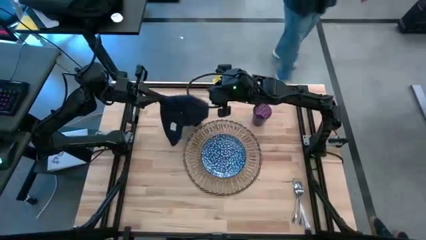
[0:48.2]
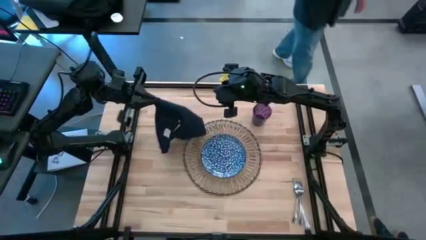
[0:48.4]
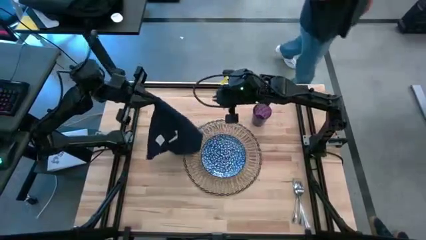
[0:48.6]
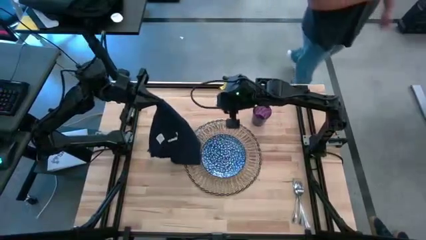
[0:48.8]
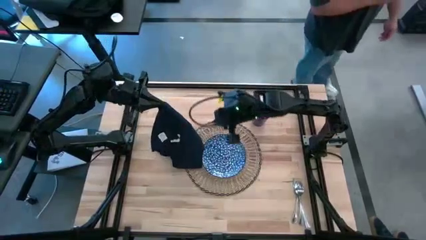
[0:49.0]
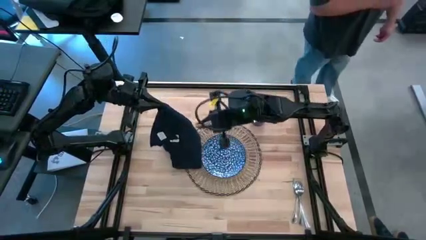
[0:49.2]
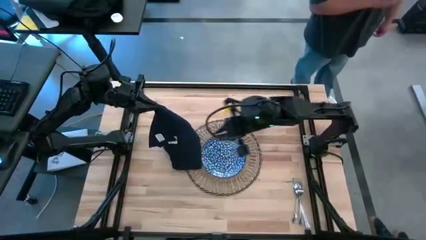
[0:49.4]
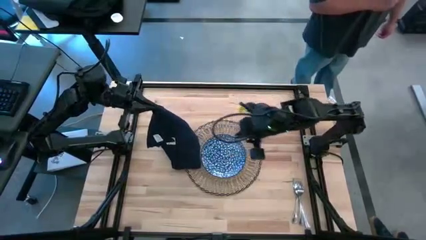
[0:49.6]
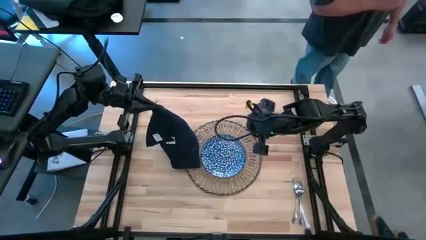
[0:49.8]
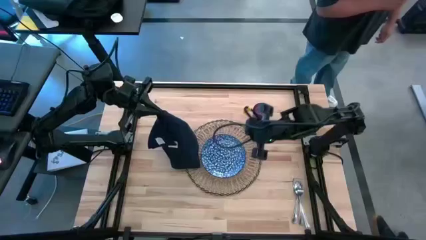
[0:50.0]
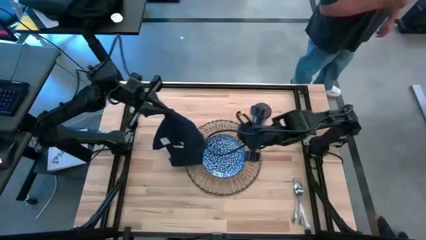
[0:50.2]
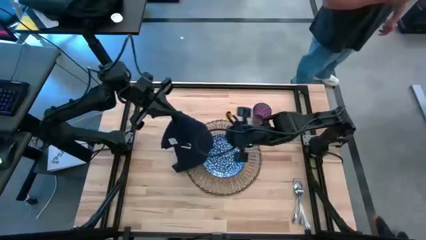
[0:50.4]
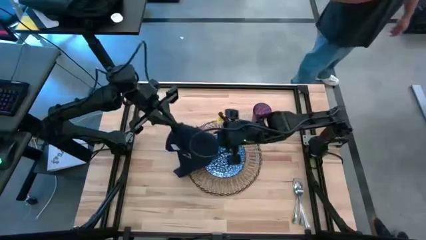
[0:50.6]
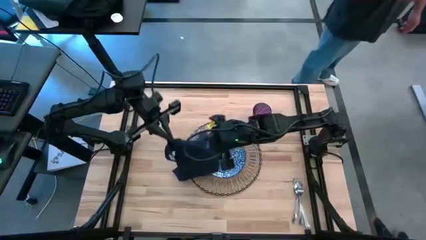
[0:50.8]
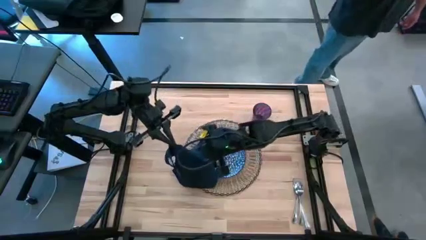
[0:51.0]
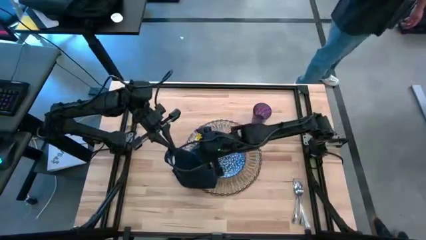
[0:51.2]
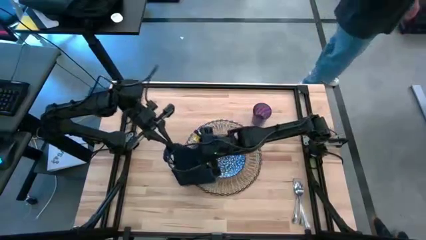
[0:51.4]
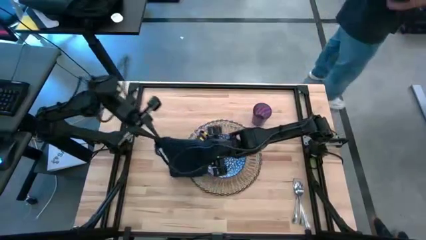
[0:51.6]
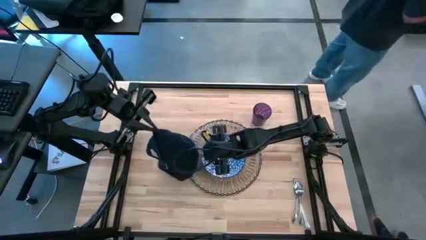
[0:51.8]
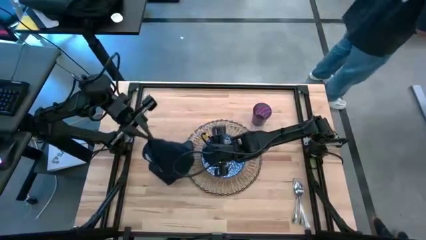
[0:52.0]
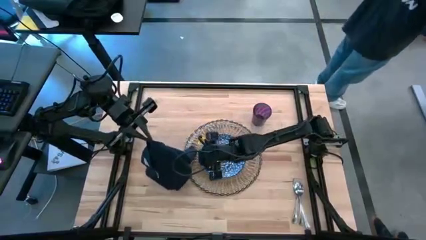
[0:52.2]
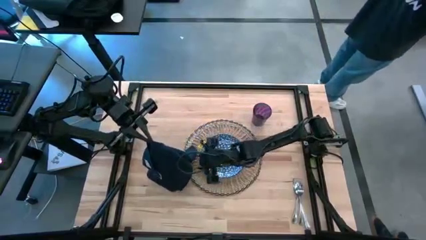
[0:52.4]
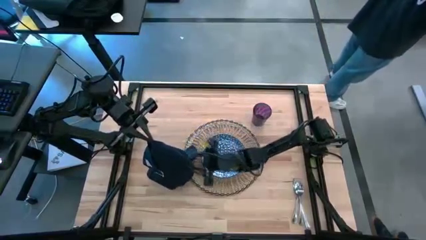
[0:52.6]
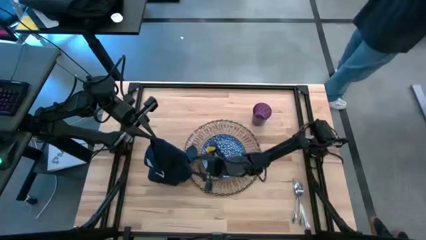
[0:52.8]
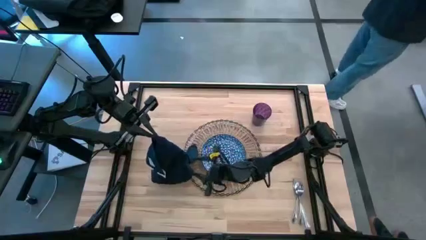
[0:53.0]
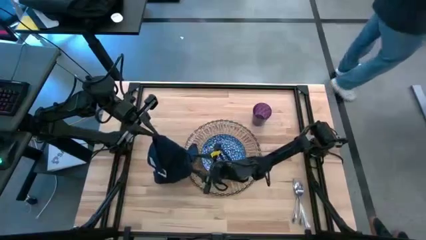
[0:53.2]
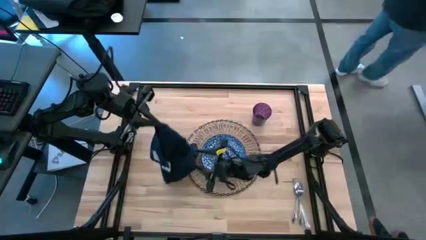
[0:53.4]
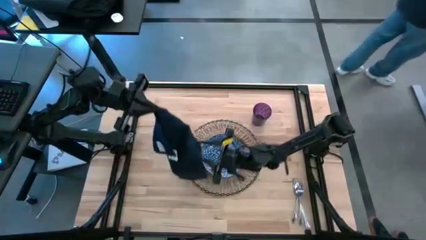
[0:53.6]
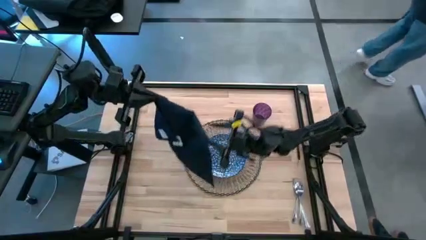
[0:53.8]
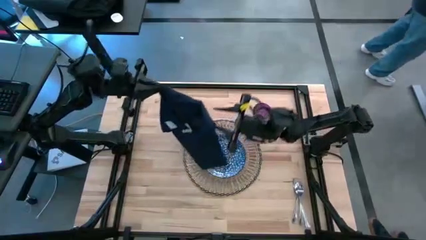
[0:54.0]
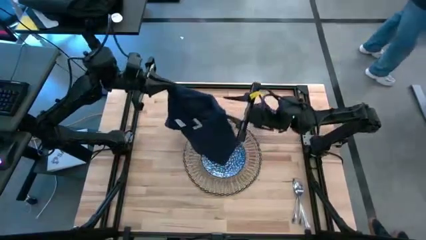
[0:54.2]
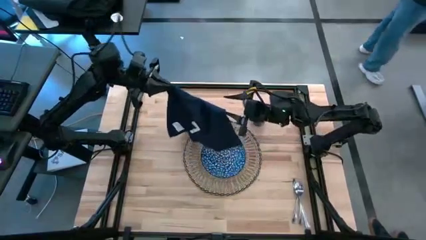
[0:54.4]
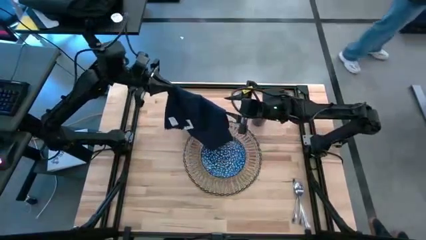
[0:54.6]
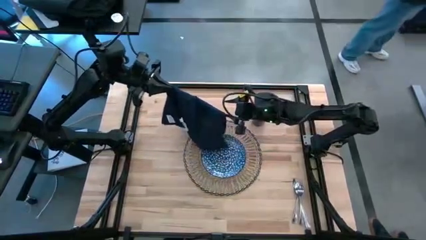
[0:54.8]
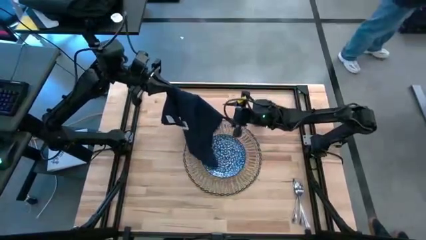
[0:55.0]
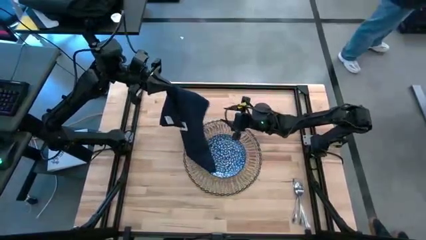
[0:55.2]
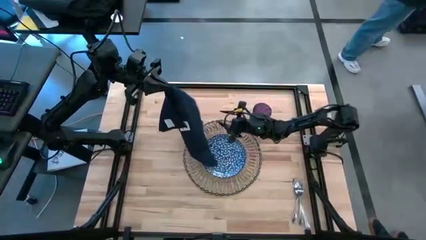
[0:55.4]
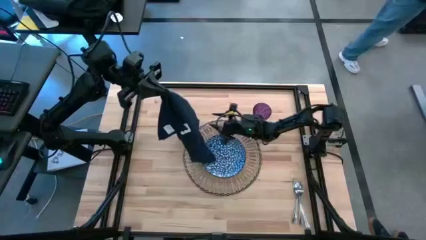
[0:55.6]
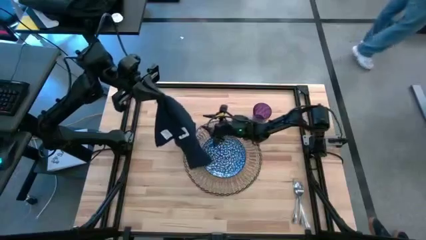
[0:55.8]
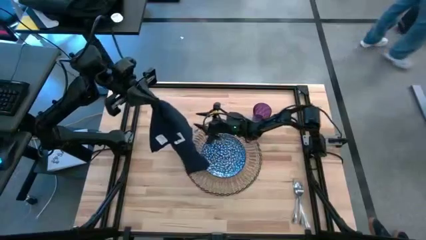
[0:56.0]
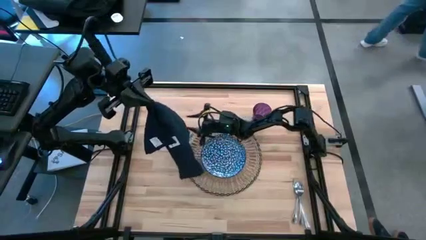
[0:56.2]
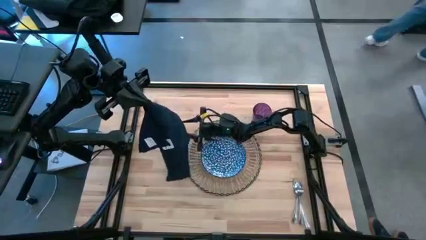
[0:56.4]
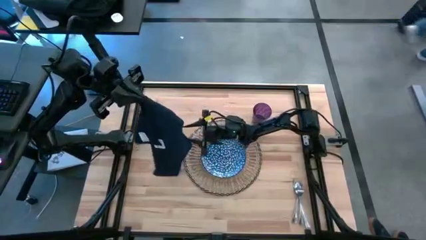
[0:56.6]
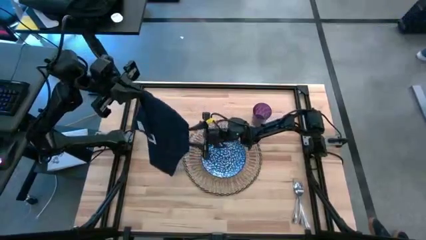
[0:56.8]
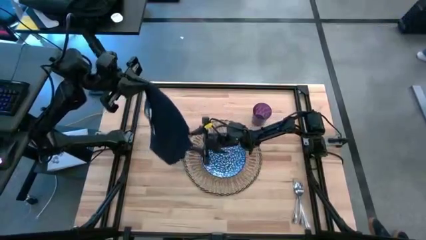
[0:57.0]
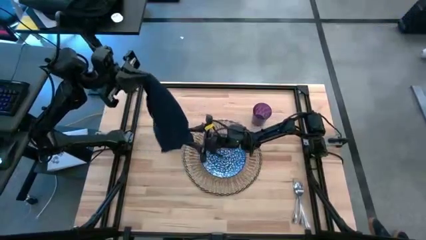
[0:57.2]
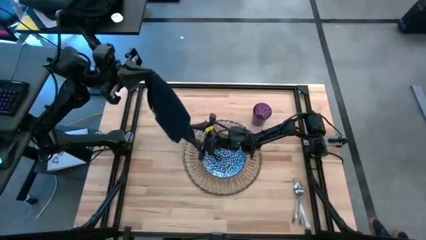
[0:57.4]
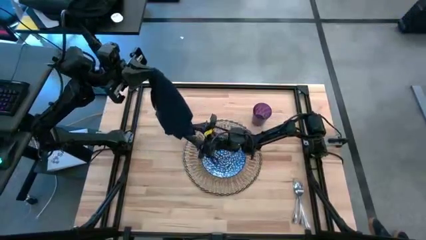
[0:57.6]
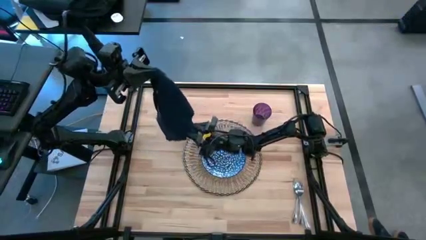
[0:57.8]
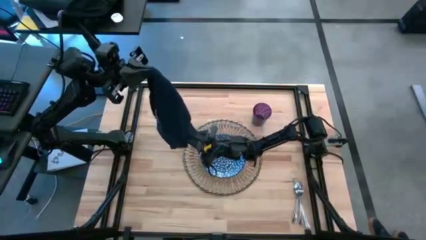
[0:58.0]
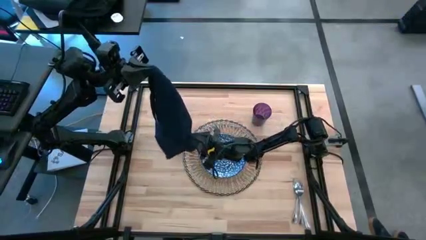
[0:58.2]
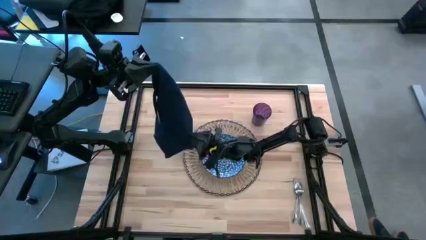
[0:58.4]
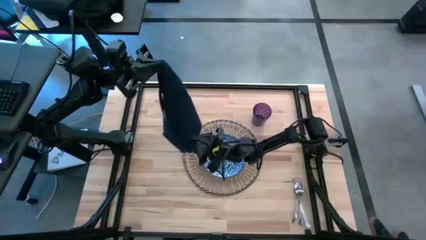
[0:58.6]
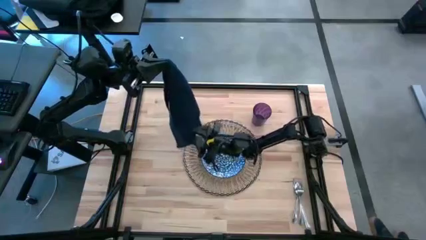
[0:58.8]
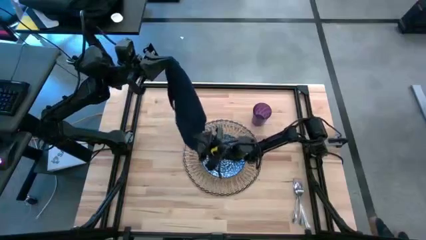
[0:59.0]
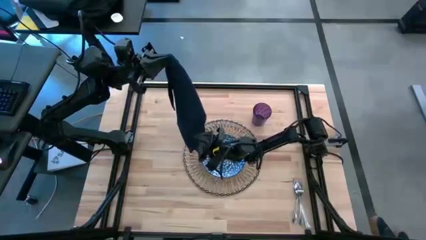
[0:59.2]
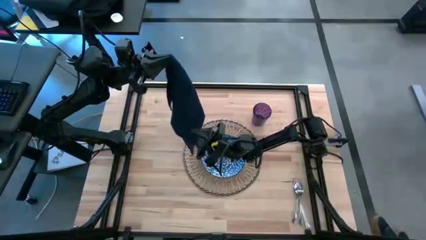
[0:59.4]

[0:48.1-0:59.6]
Task: Set table place
Fold the blue table napkin

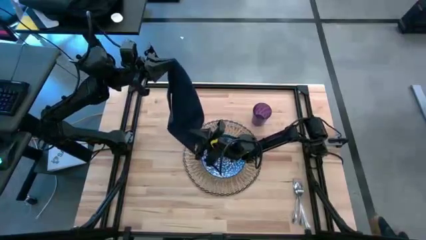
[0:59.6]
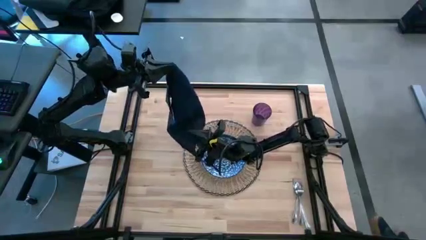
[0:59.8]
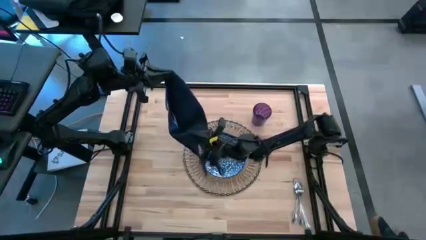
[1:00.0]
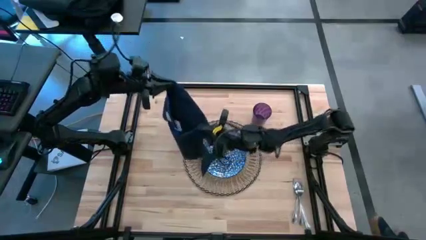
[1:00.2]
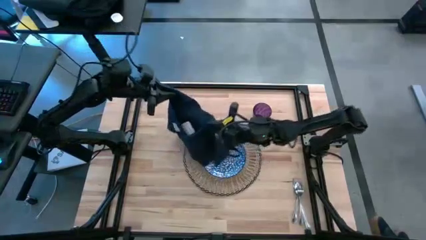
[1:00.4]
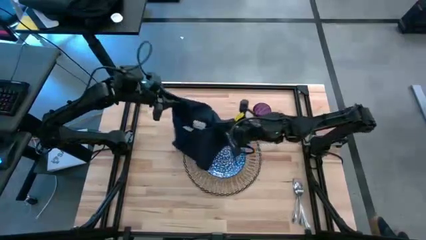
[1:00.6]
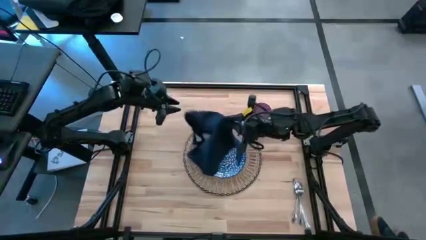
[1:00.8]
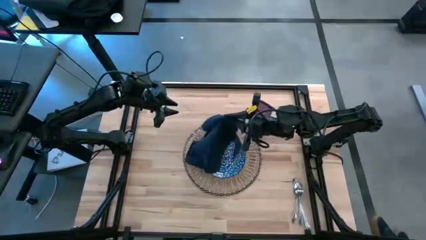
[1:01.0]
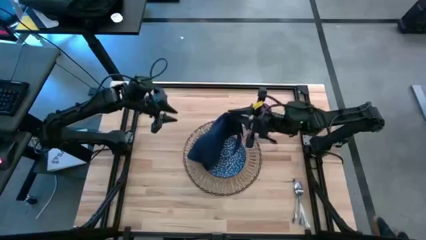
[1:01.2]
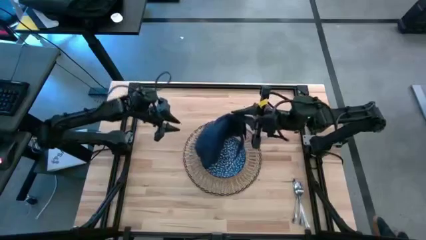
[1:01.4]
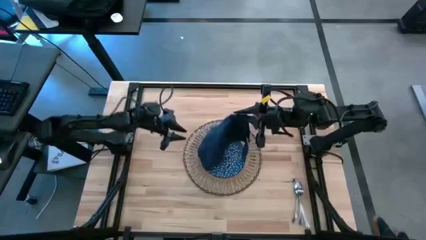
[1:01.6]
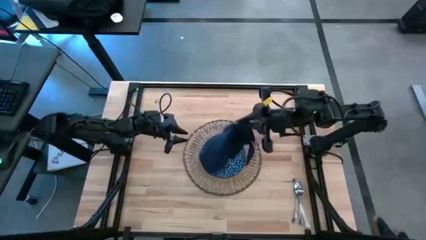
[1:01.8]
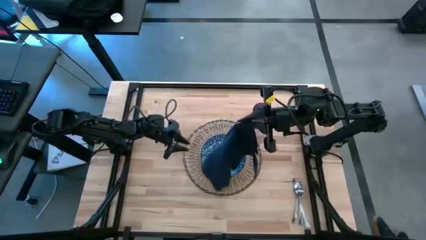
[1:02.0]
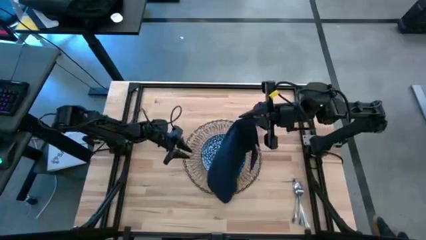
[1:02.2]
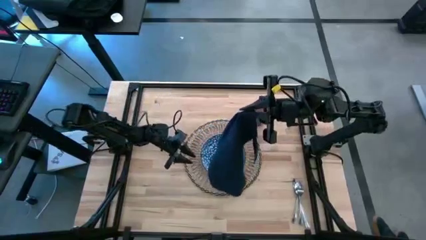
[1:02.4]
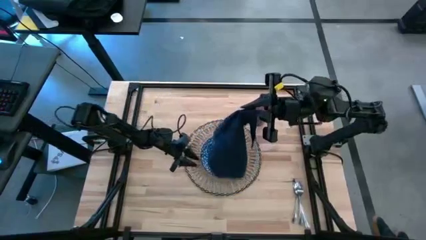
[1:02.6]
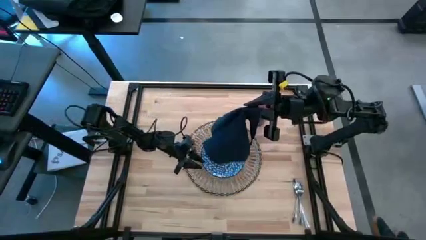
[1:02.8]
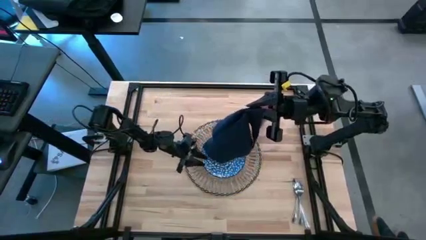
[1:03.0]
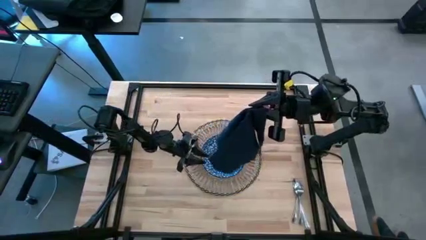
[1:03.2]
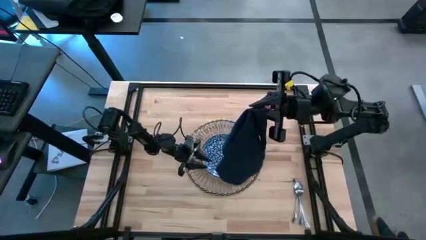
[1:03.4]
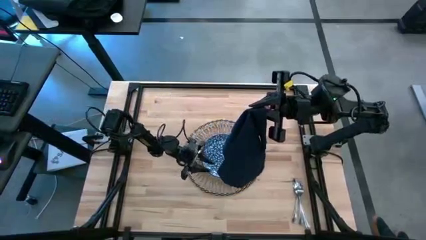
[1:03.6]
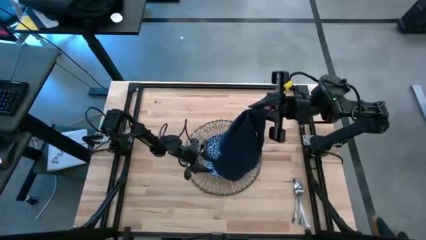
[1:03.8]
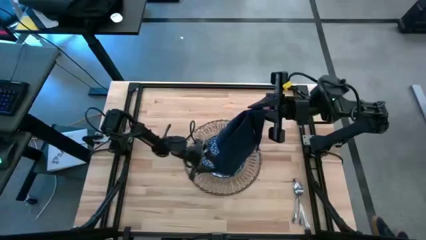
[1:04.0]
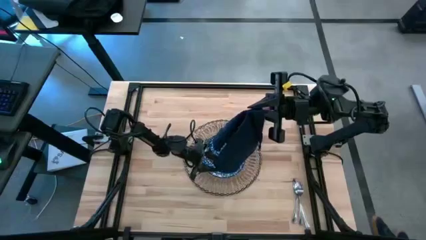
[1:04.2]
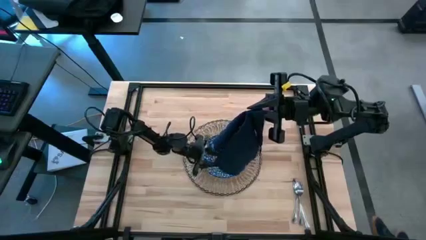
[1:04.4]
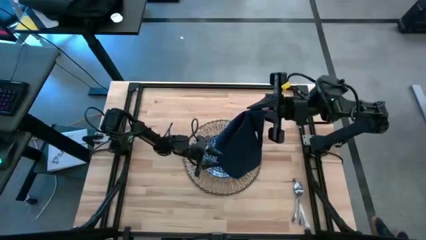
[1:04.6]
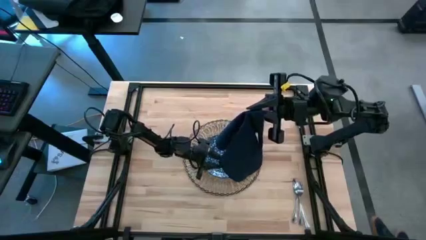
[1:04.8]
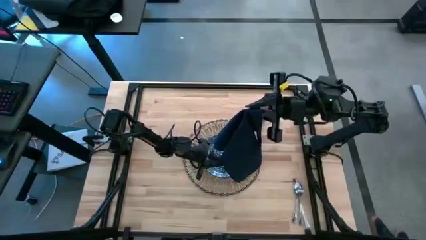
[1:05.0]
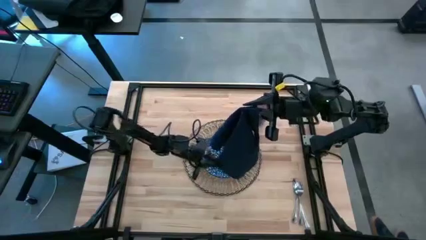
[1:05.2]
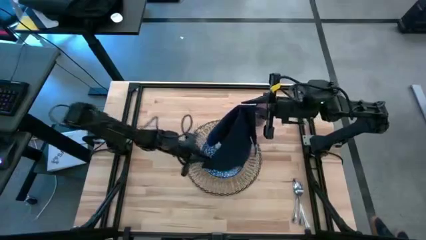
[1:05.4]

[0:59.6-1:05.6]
Fold the blue table napkin
